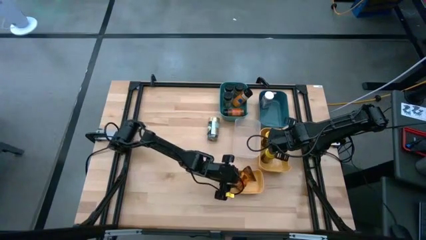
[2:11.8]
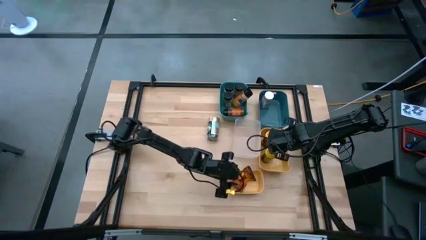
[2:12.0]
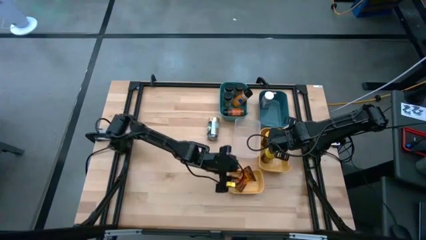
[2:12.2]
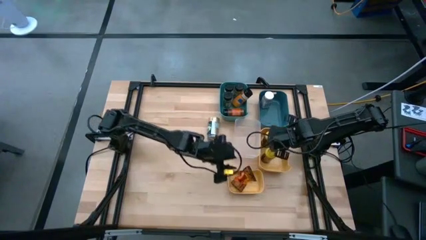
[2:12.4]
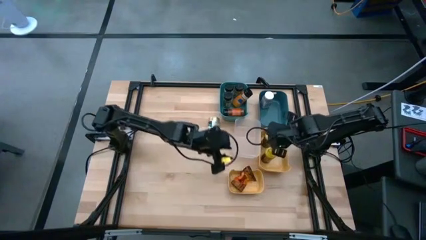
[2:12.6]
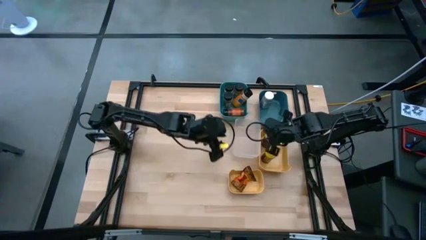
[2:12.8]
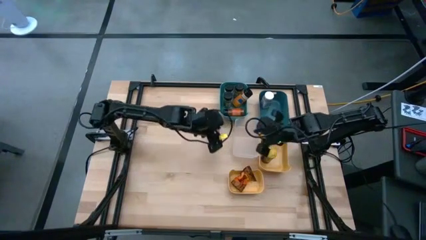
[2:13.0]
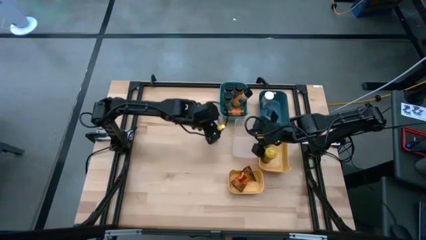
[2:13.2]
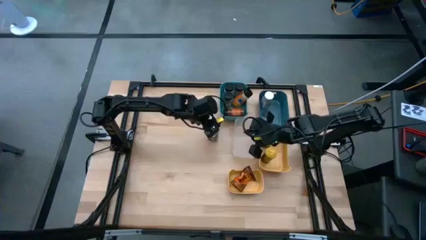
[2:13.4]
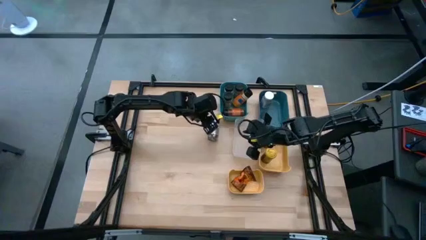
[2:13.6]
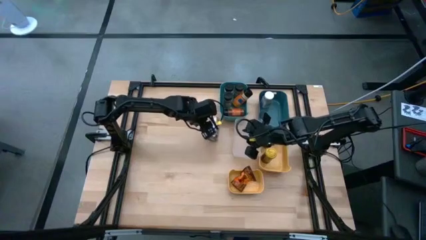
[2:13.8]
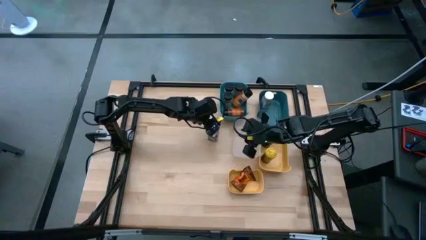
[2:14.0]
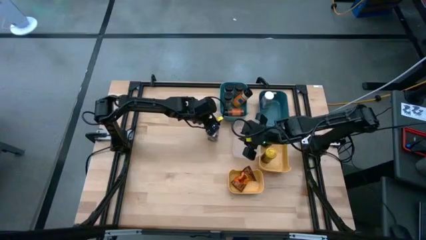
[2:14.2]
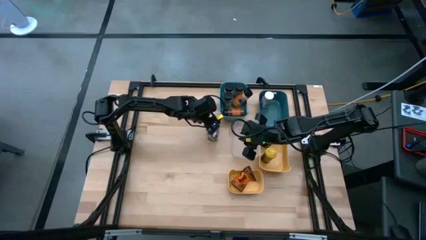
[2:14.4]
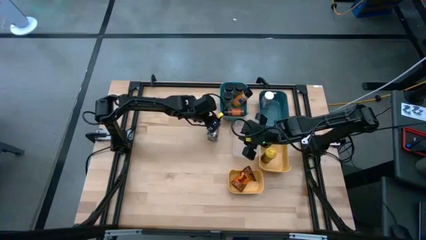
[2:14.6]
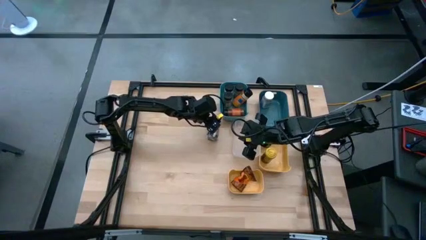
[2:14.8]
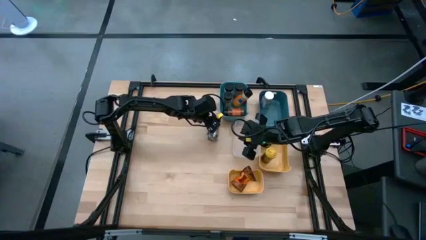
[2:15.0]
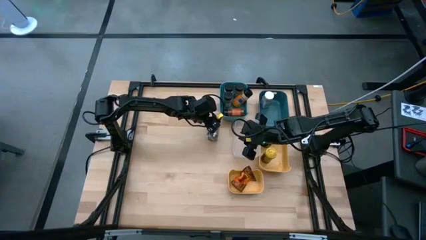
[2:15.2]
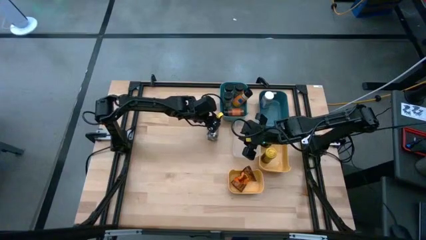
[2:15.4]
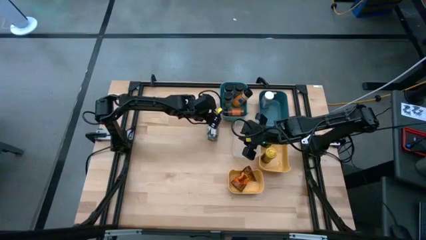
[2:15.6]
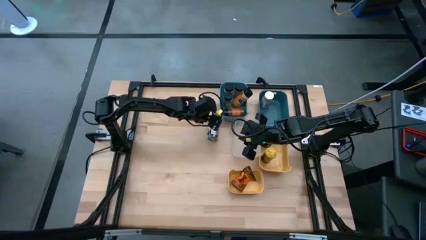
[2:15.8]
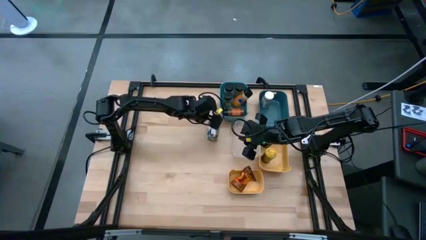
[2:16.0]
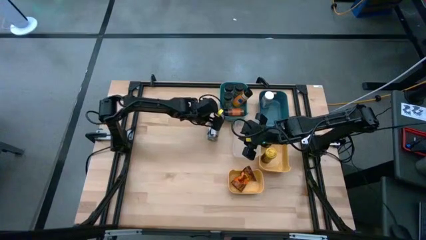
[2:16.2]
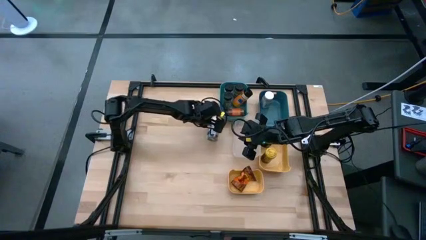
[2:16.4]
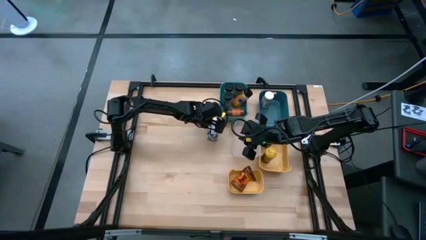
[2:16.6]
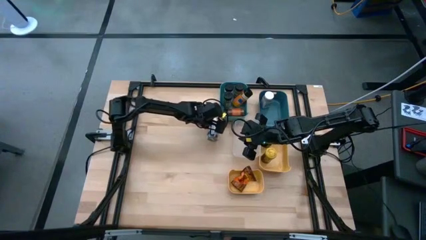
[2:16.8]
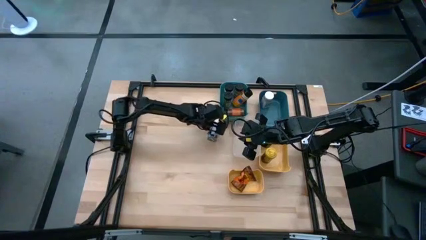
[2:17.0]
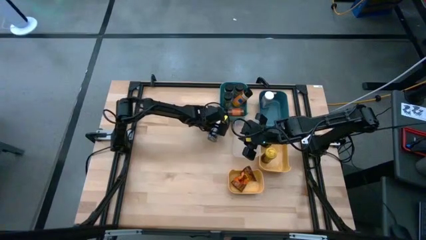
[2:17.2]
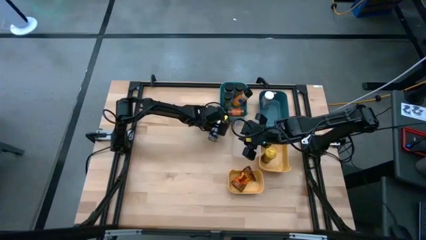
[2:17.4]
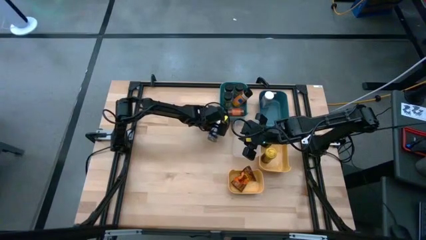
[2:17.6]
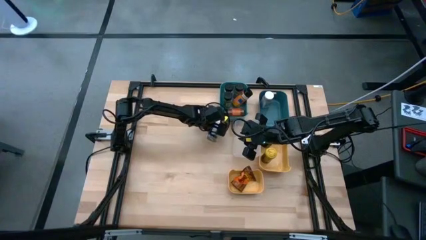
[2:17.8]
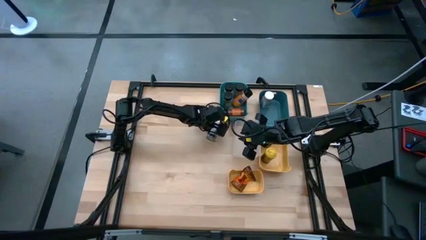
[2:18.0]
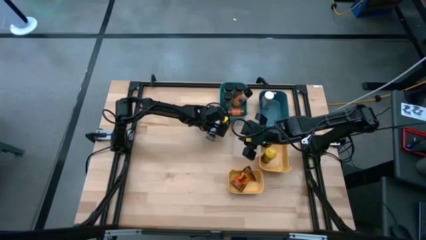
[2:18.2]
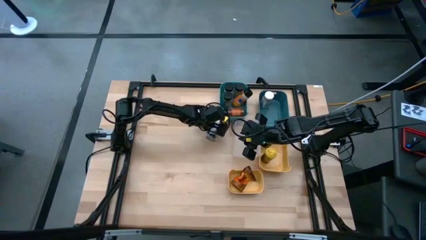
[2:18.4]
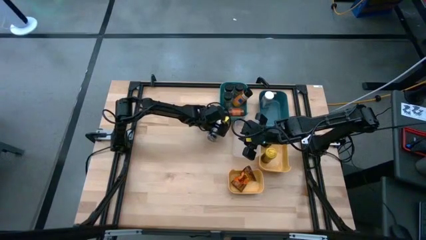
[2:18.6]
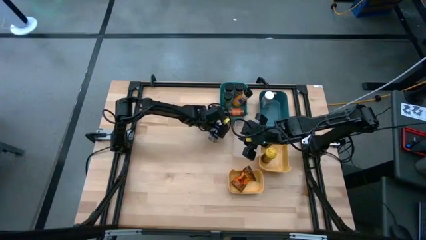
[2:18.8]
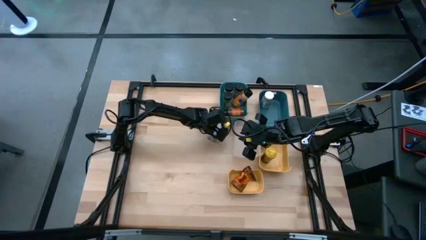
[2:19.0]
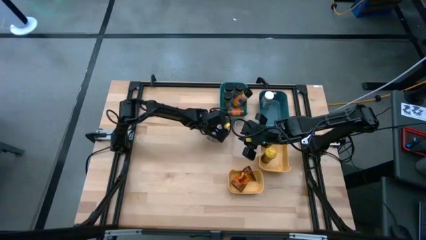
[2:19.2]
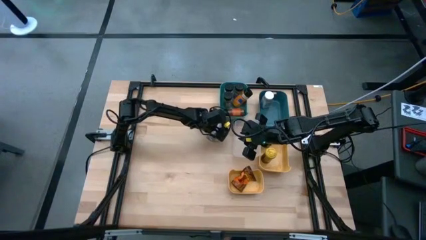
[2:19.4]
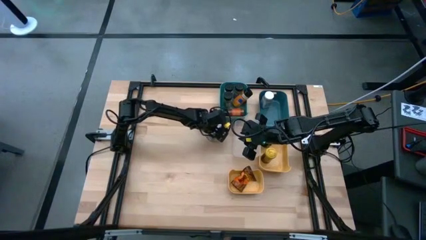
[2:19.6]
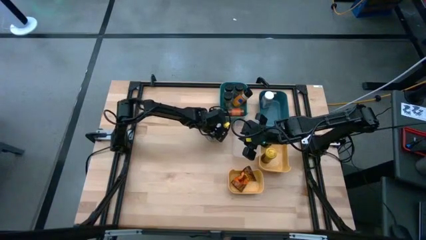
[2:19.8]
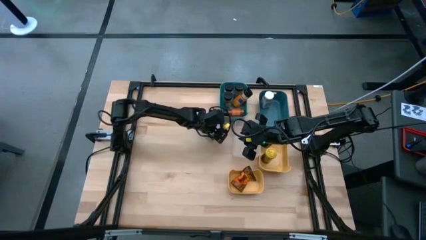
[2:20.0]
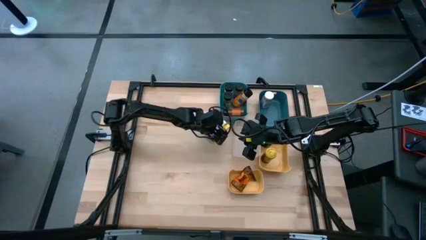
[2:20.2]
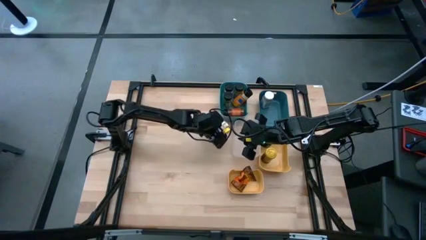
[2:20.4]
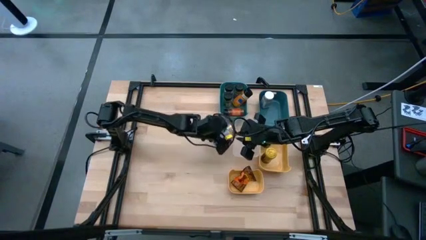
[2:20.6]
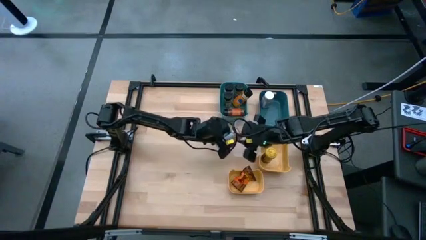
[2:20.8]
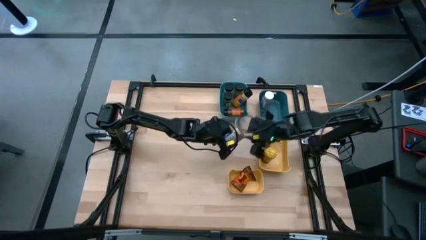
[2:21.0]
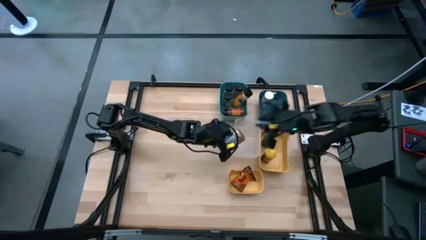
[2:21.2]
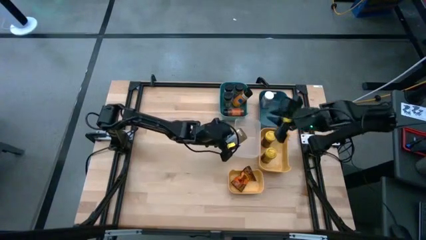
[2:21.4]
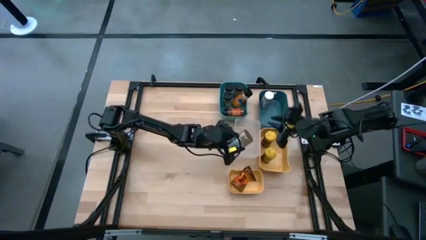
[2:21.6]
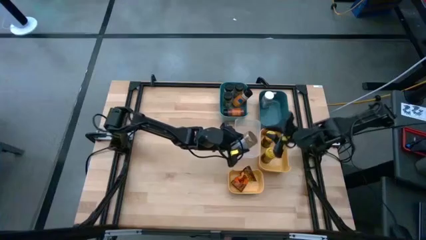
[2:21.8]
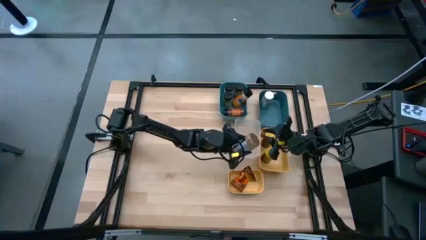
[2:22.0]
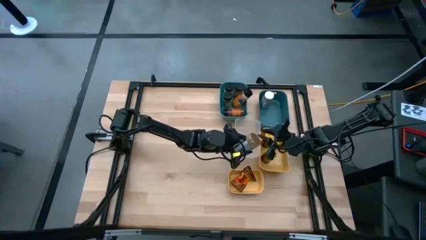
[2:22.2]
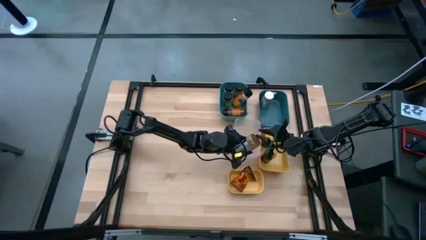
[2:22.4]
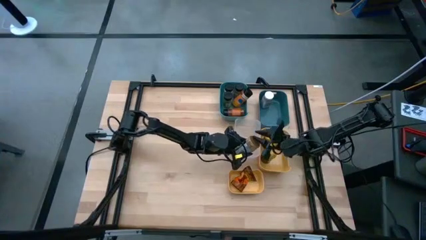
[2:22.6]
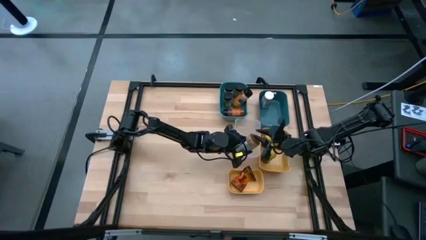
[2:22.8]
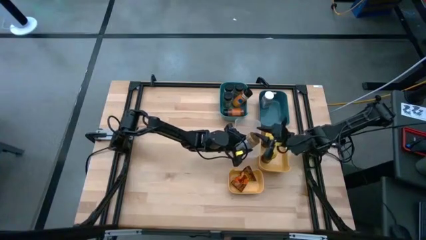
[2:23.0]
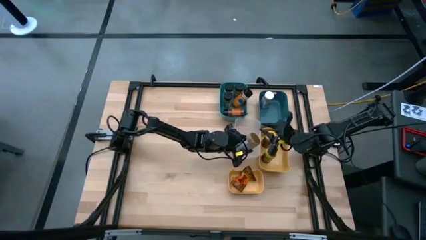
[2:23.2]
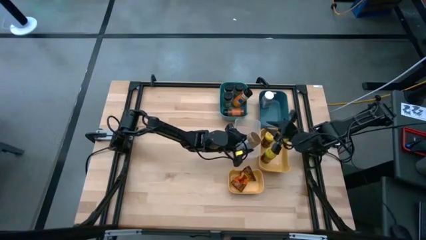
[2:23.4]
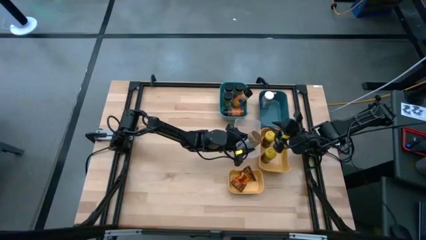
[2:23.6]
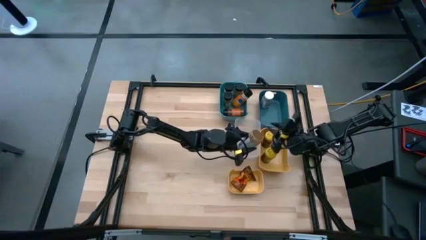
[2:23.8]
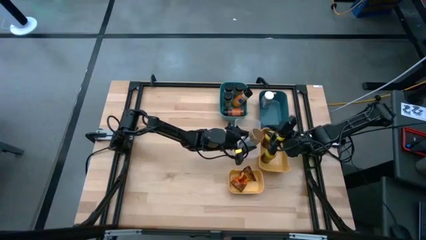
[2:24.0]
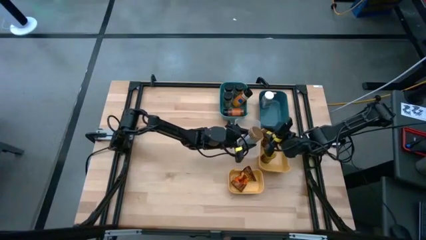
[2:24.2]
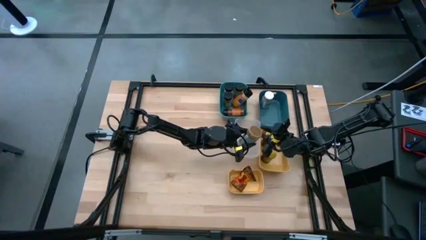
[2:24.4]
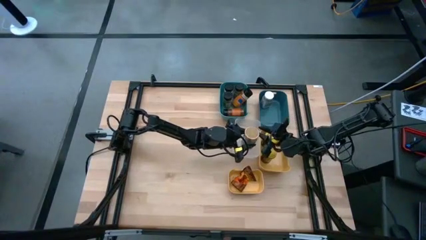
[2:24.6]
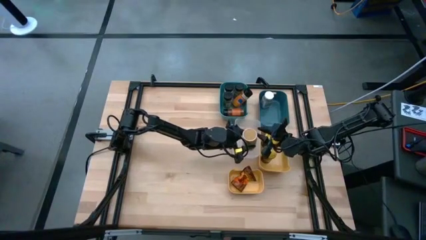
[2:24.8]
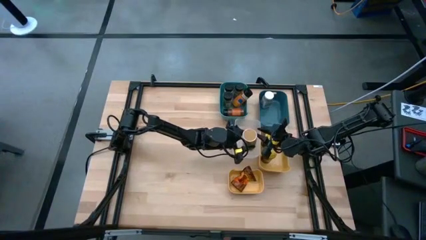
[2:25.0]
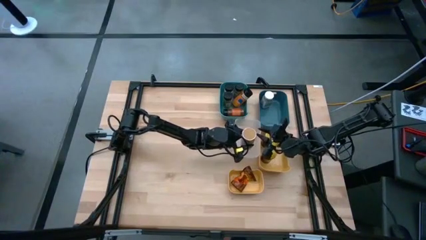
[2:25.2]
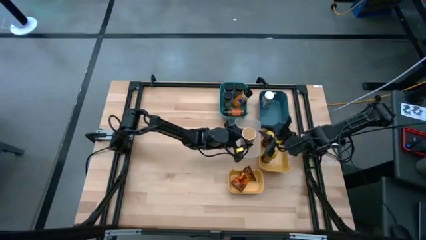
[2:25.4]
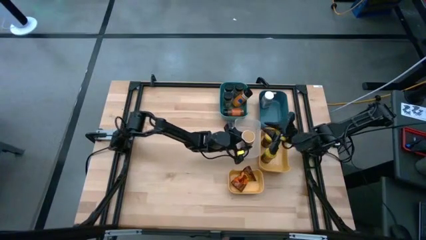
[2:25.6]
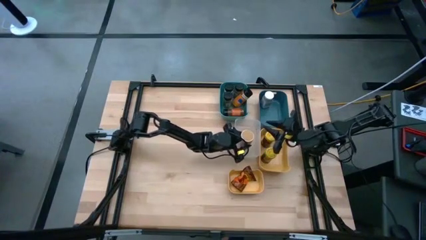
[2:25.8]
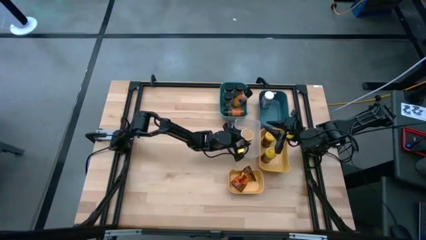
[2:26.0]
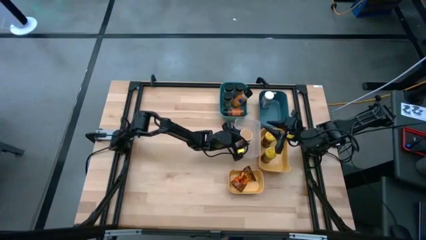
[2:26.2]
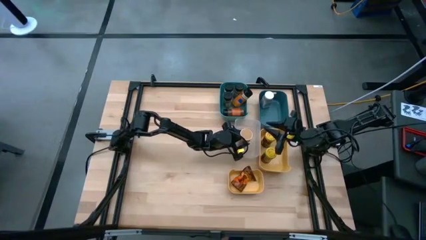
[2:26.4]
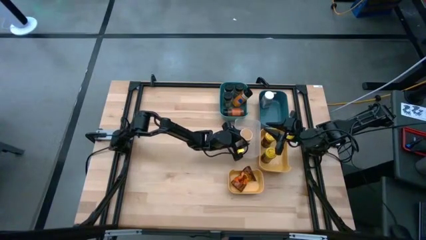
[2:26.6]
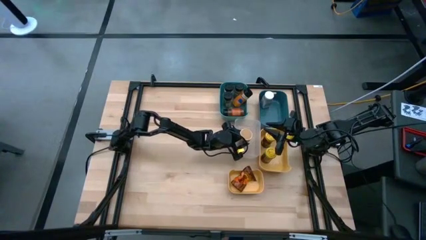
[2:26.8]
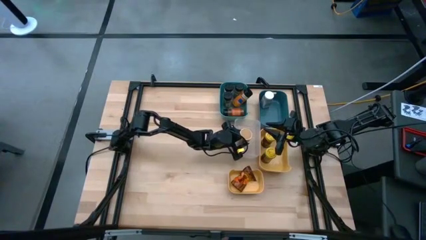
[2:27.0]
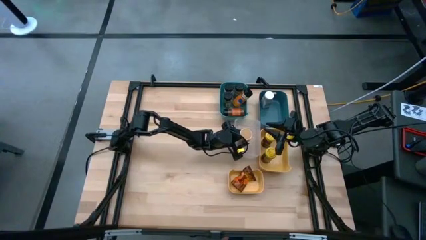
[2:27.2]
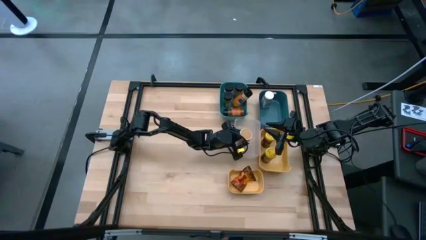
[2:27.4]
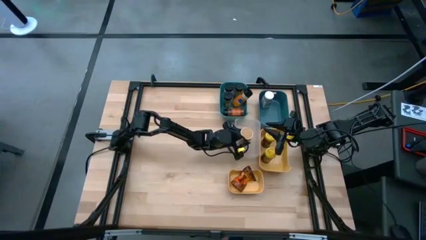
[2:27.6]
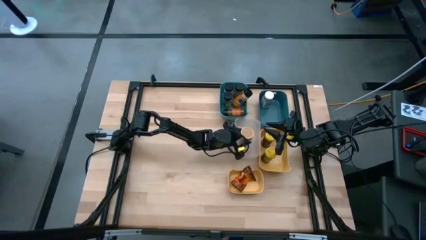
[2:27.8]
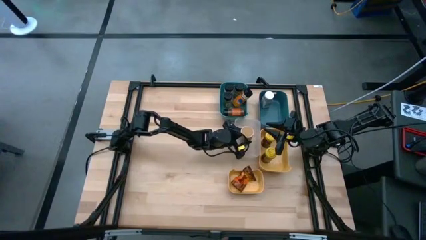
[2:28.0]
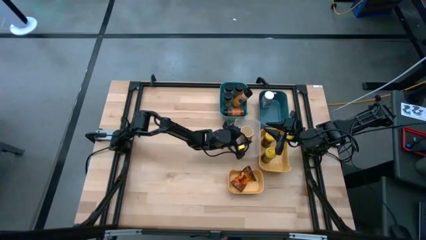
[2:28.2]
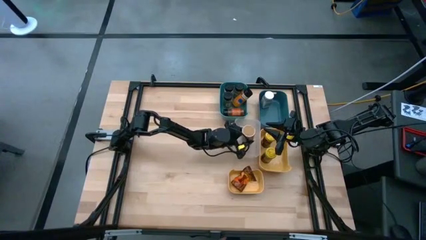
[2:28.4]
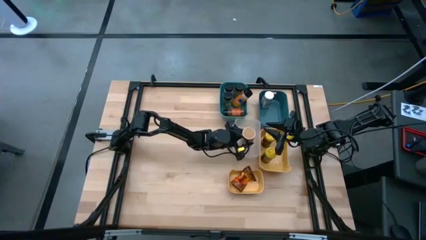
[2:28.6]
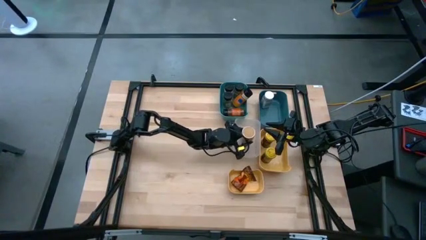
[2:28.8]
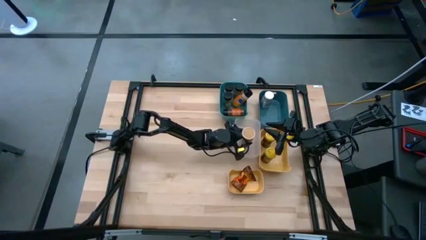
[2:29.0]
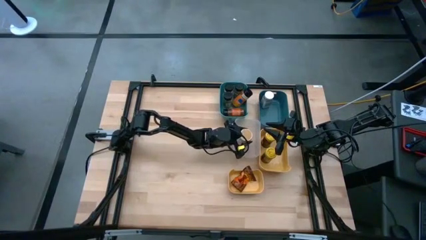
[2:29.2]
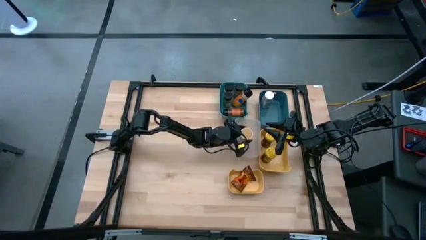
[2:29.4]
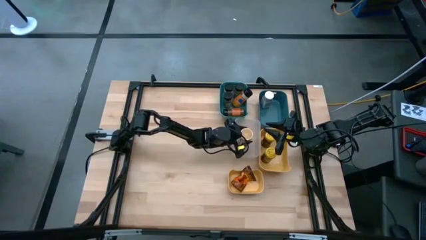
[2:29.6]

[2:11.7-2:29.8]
Task: Sort spices by type
Put the brown seasoning into the transparent bin
